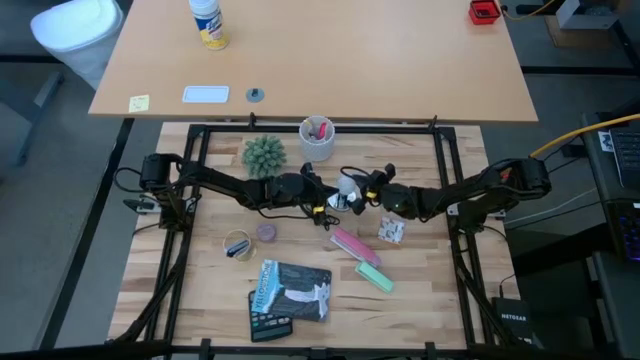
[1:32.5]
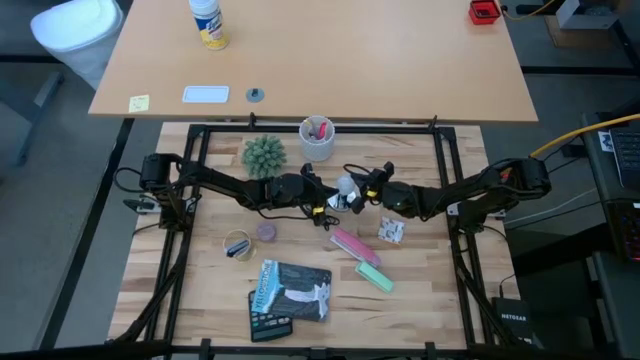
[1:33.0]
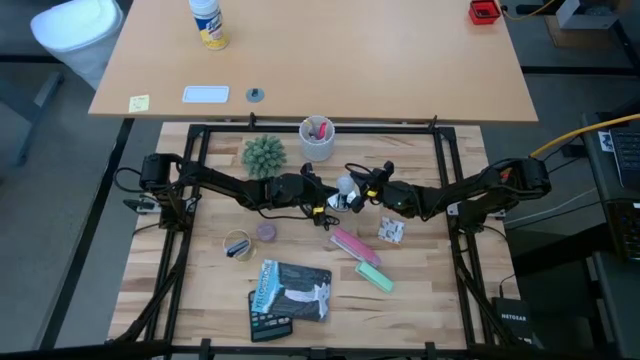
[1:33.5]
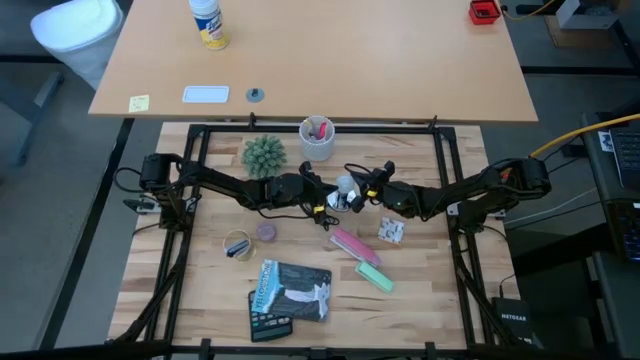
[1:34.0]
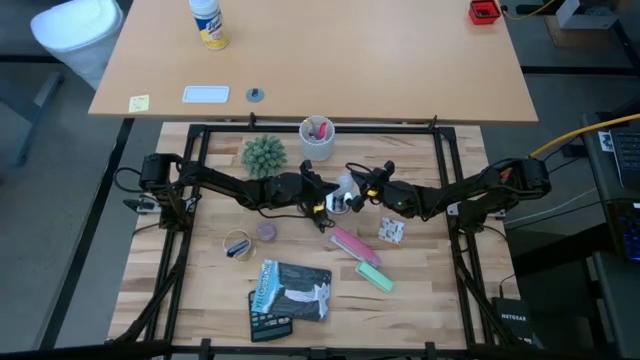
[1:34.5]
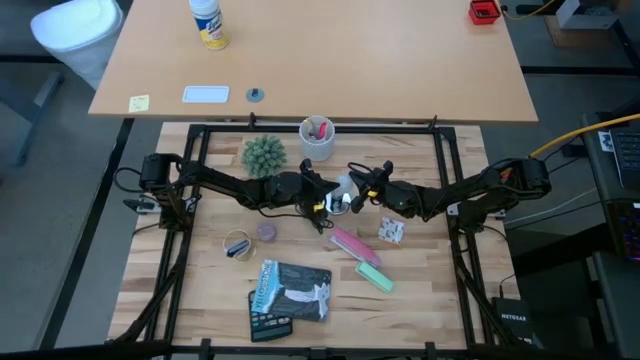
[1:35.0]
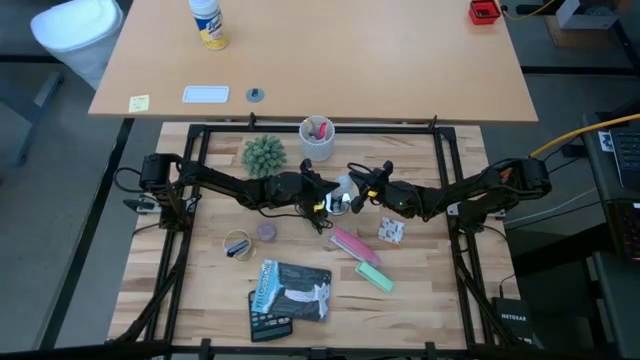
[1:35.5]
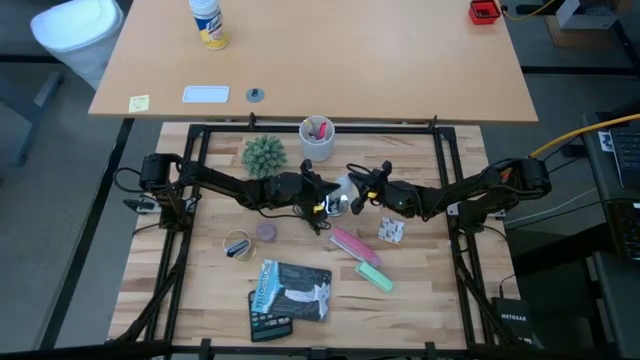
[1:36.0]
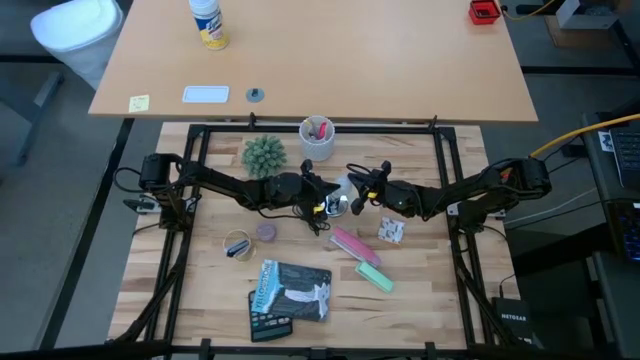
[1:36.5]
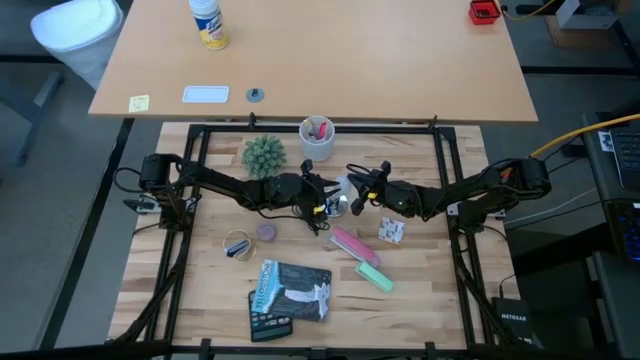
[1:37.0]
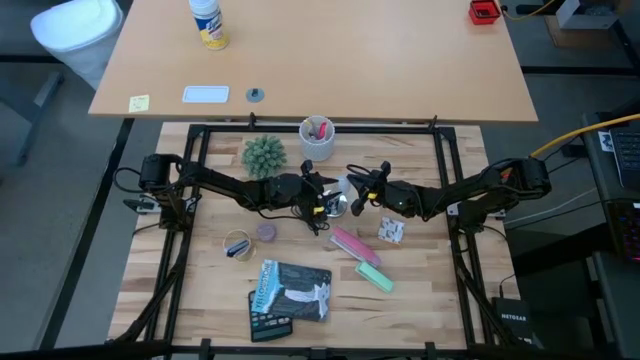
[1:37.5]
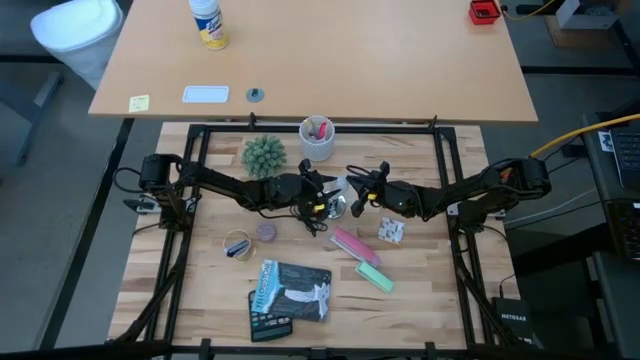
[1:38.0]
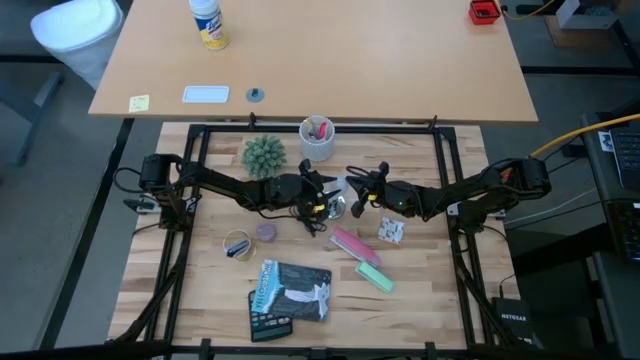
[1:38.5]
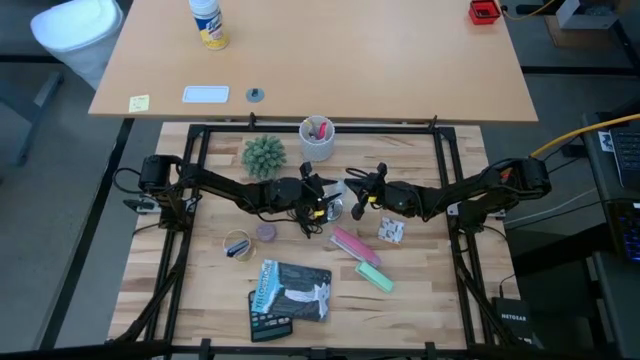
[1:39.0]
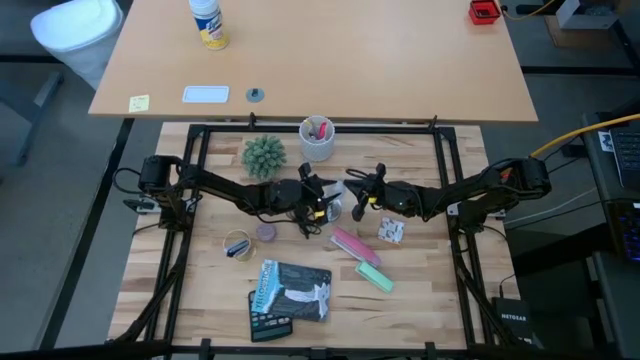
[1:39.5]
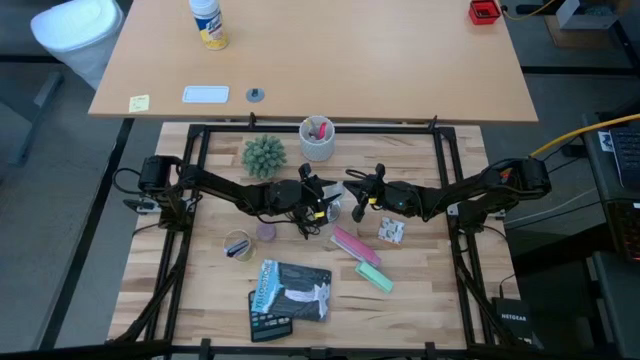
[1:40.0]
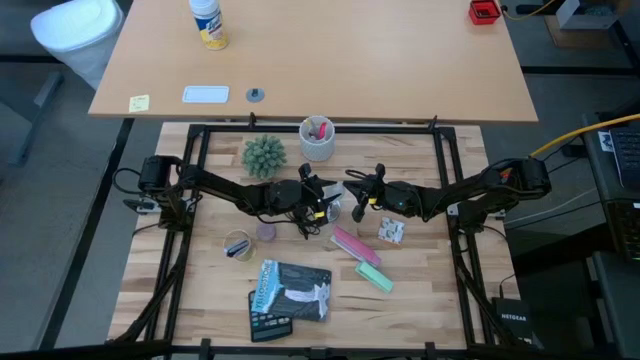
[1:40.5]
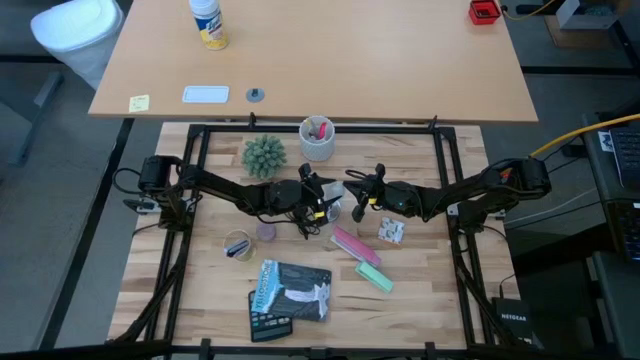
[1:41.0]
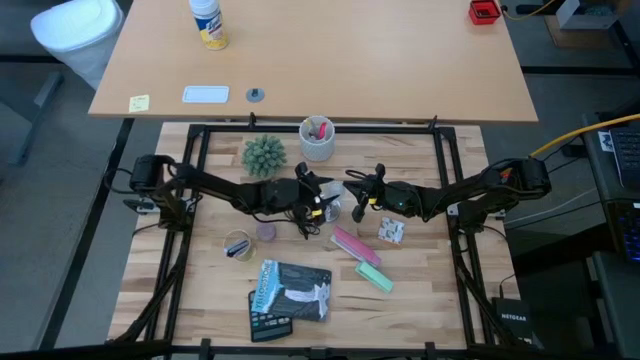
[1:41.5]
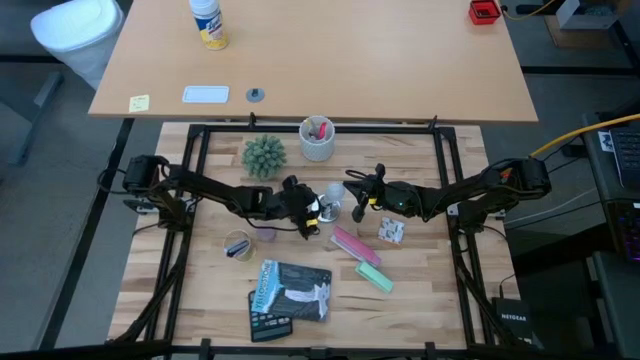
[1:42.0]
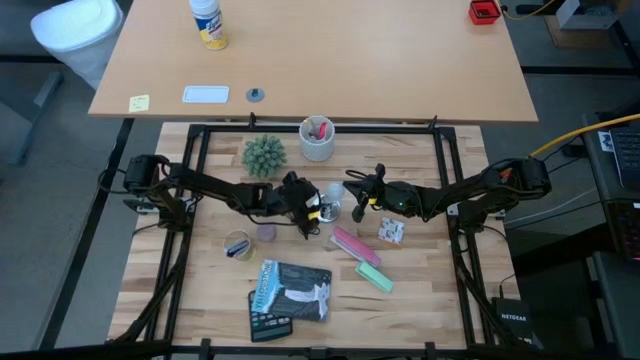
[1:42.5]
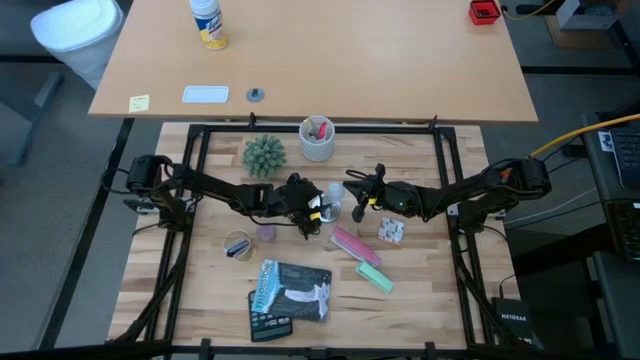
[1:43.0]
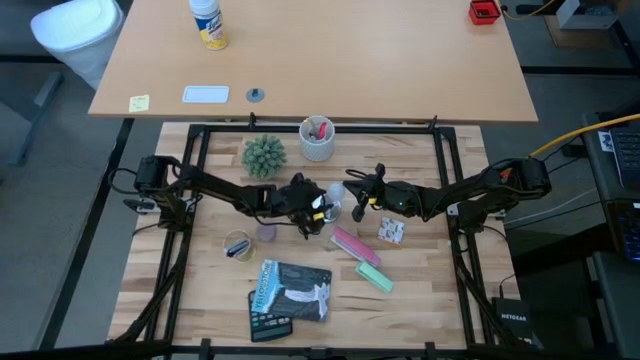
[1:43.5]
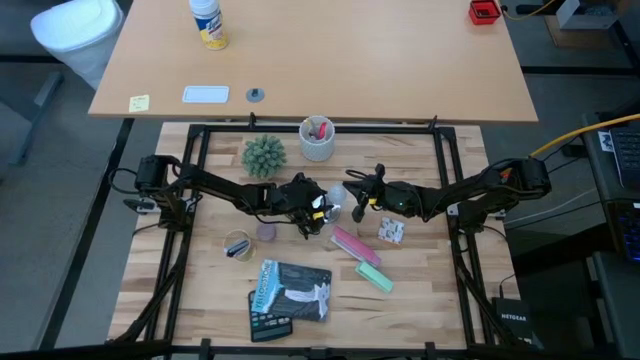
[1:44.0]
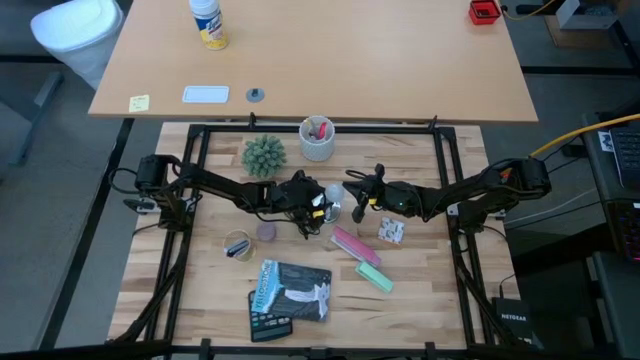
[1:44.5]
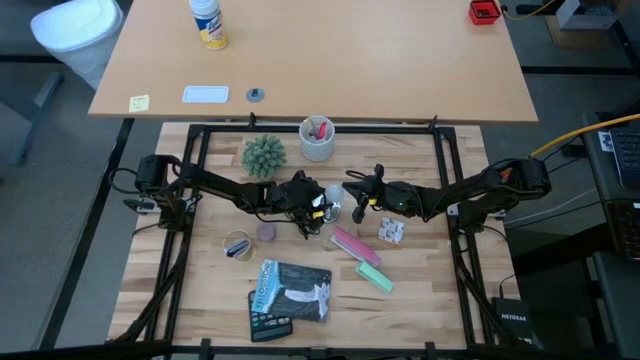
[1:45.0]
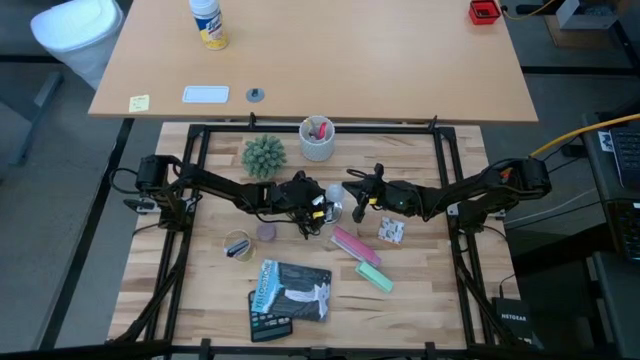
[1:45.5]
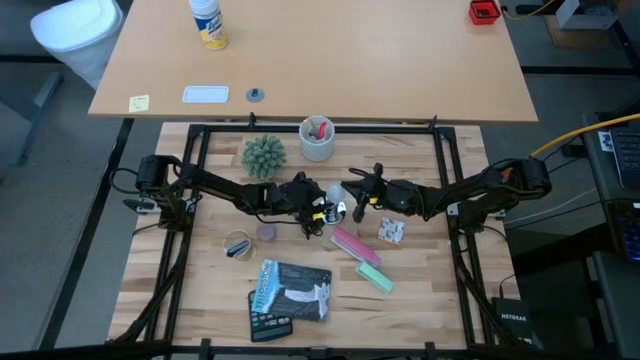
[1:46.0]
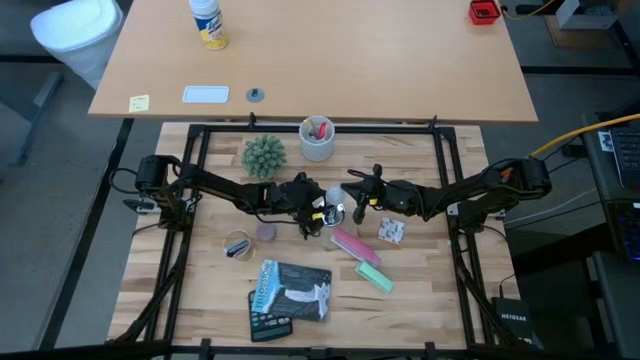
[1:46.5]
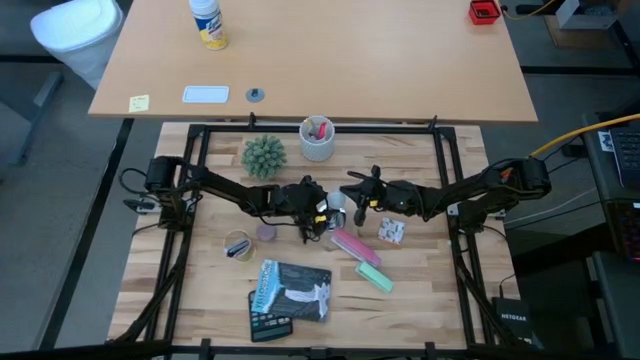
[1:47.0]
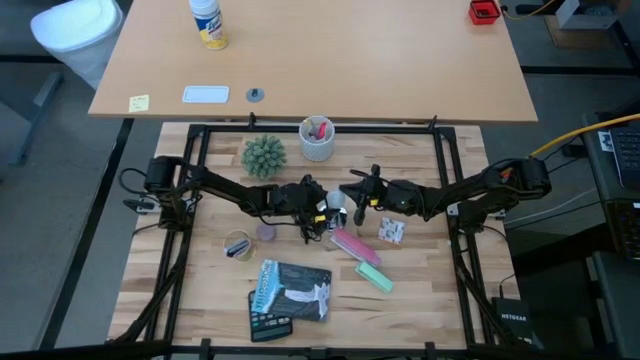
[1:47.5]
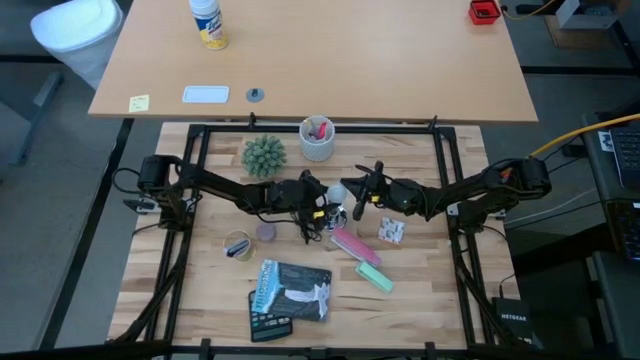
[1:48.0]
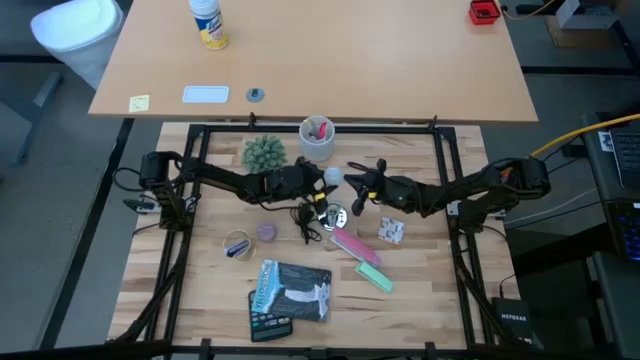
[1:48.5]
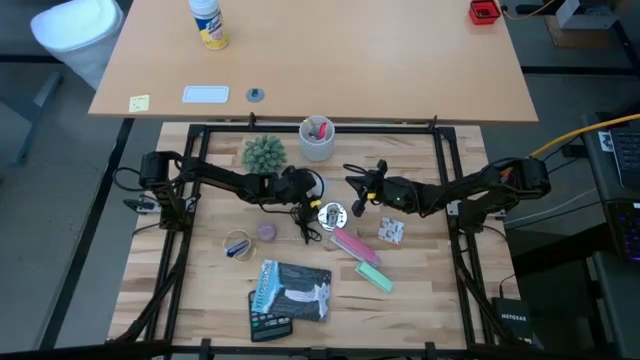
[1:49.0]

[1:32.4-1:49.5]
Task: Screw lightbulb
Remove the lightbulb from the lamp

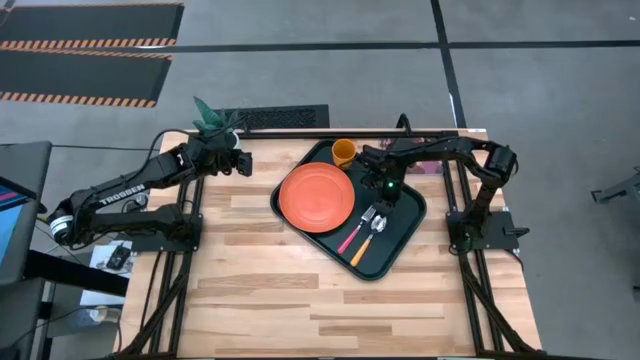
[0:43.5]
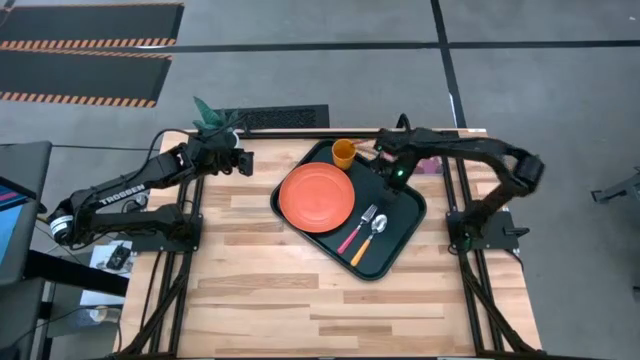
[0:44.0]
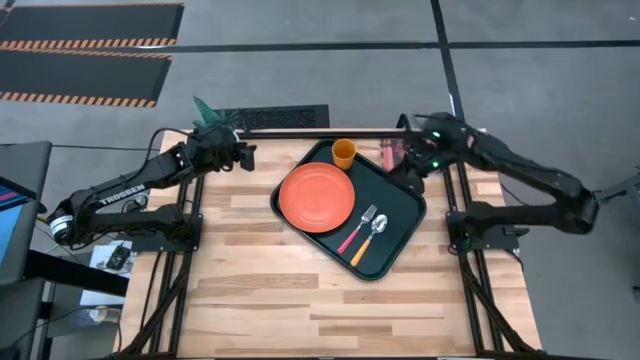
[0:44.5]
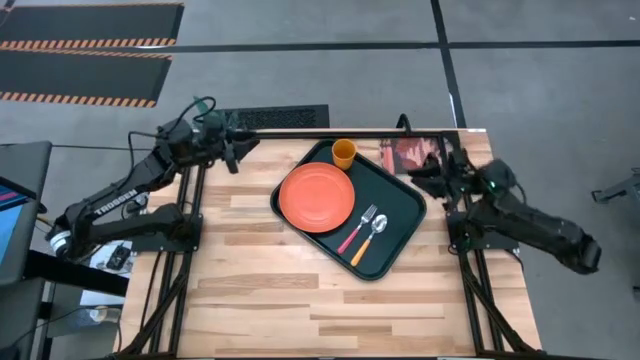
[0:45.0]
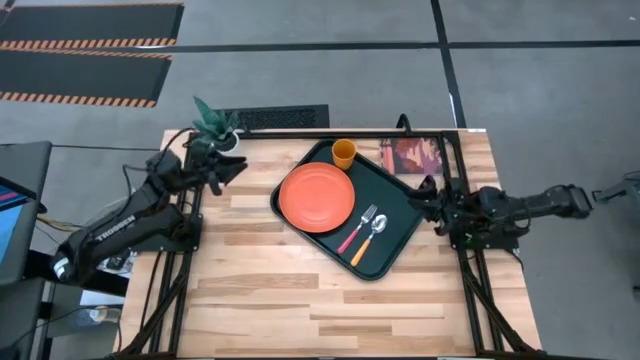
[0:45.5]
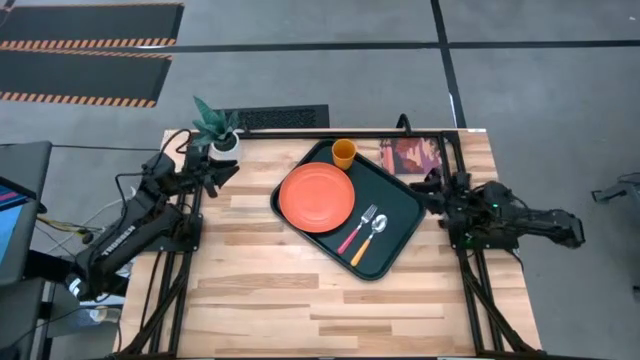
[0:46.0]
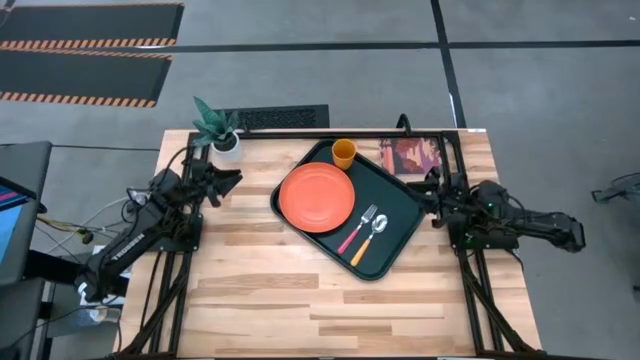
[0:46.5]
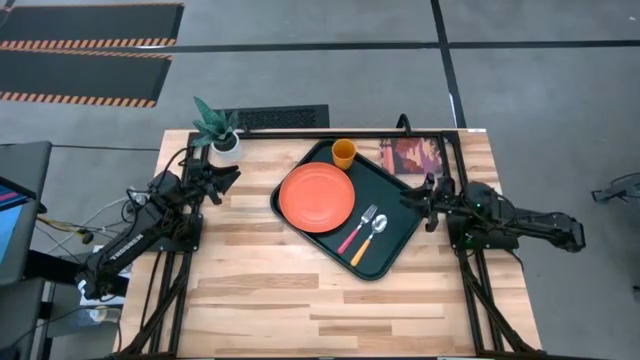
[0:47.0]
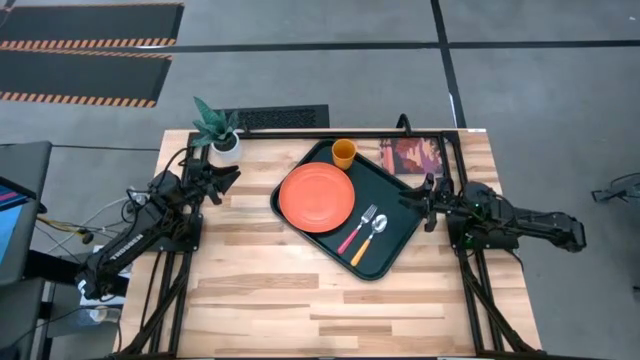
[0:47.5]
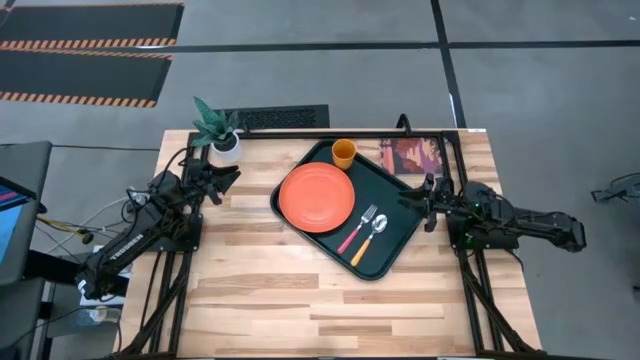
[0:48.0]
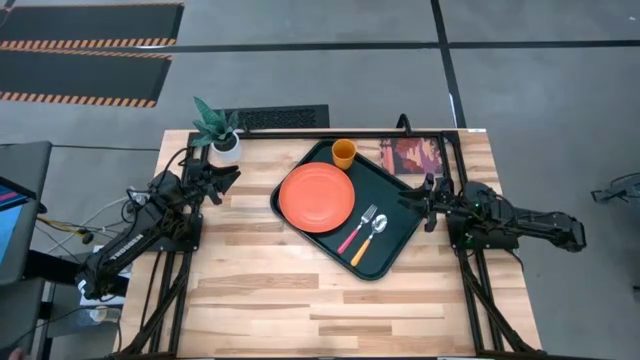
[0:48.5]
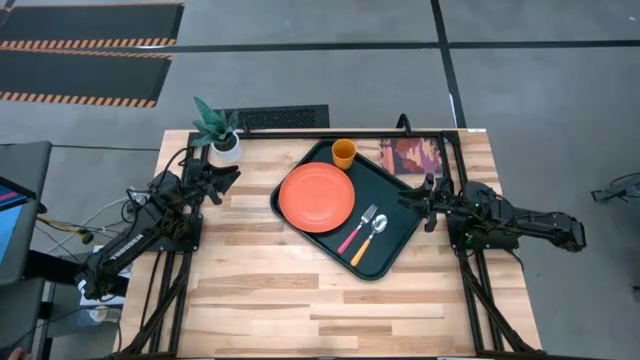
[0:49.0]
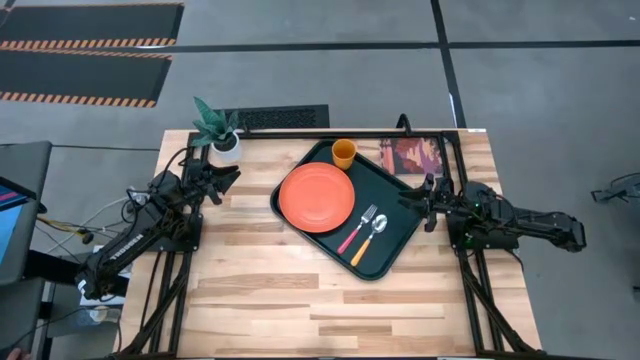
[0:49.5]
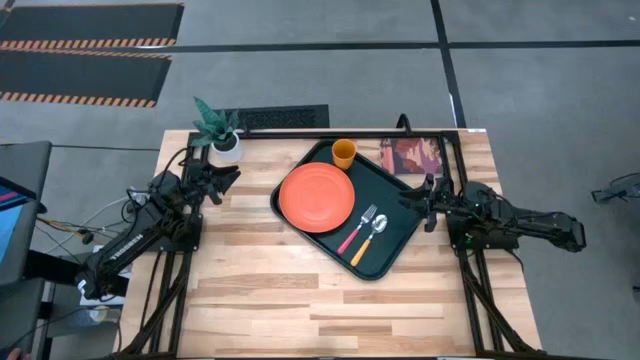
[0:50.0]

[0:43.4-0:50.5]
Task: Pick and place plate/cup/fork/spoon on tray
Return to Home Position
